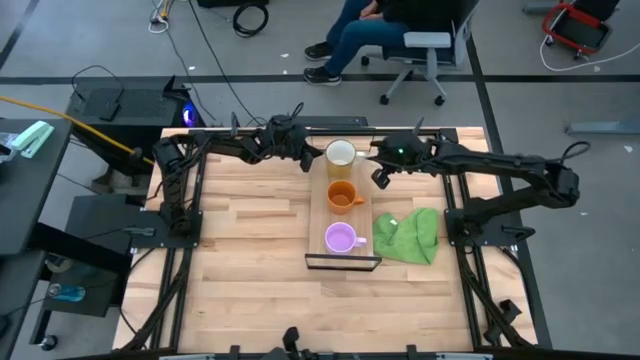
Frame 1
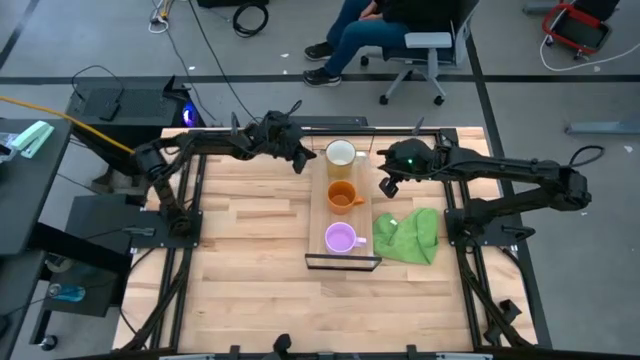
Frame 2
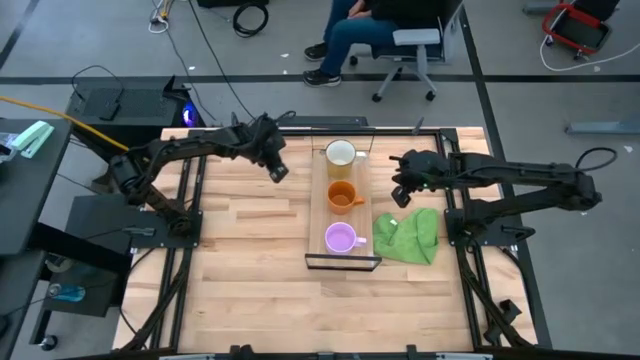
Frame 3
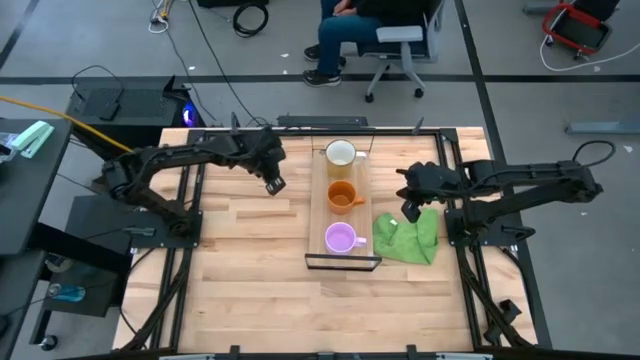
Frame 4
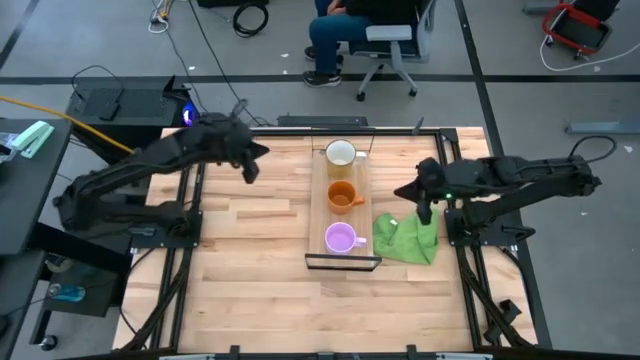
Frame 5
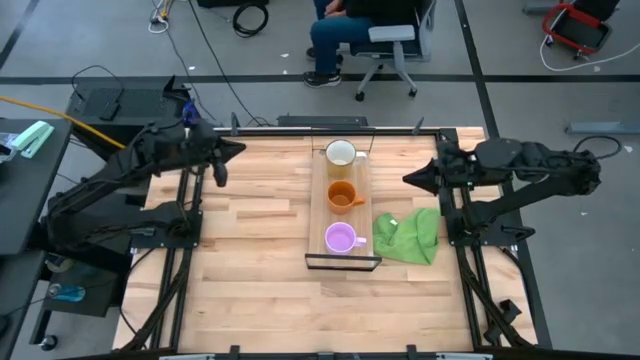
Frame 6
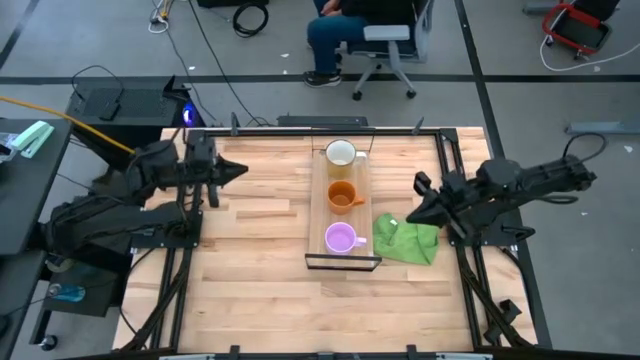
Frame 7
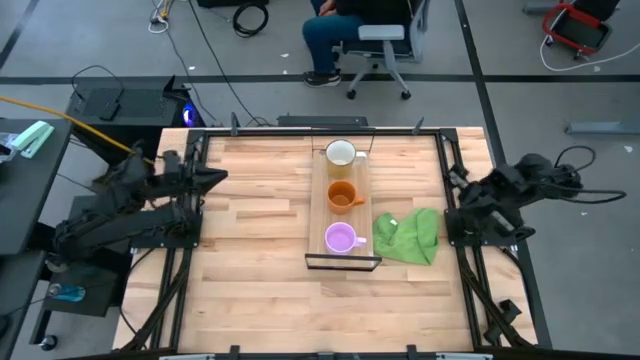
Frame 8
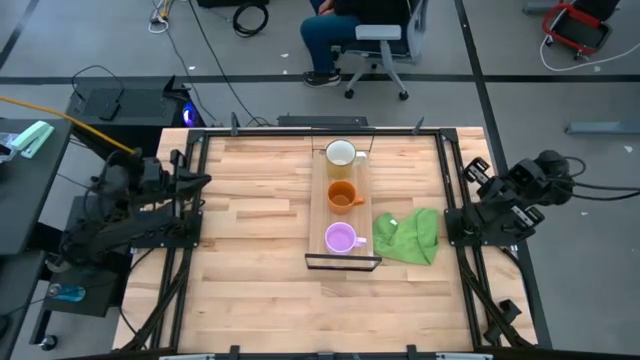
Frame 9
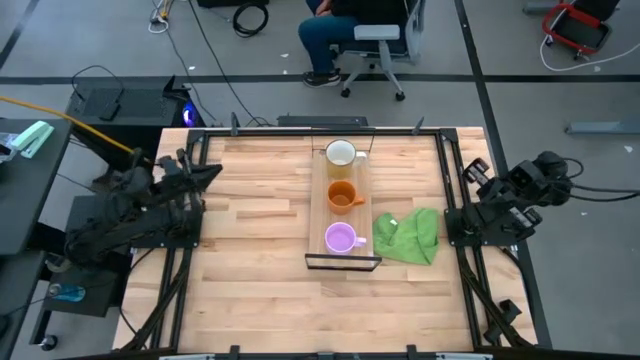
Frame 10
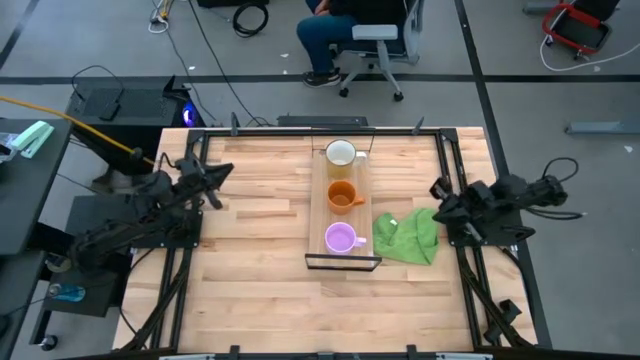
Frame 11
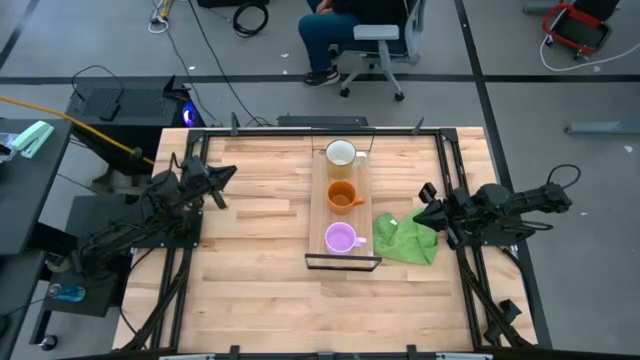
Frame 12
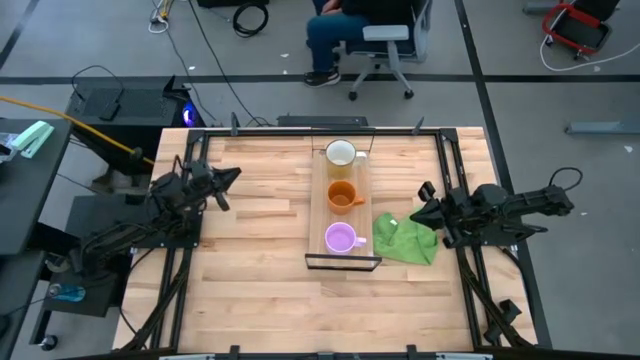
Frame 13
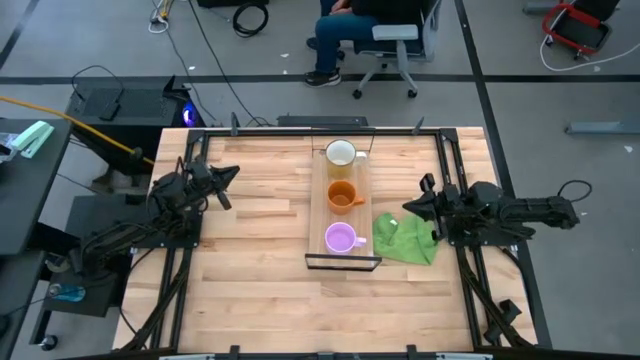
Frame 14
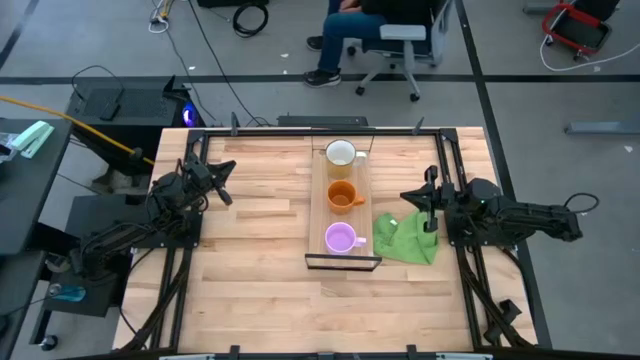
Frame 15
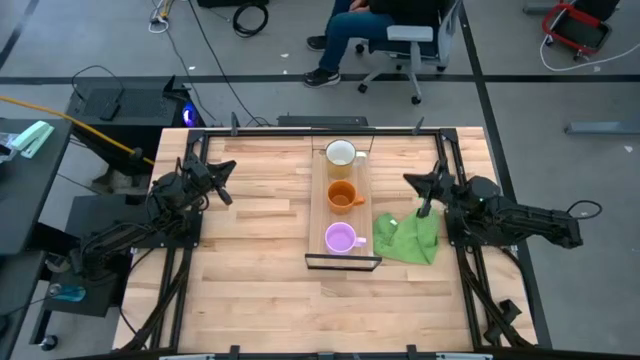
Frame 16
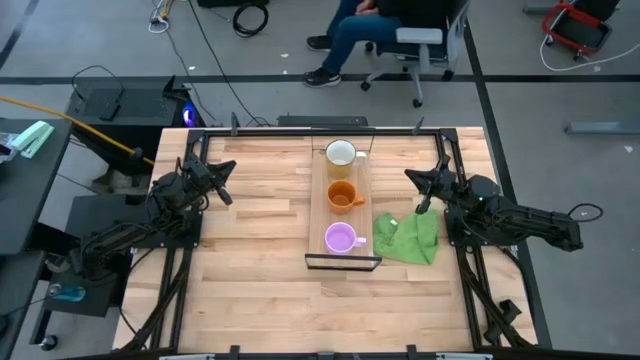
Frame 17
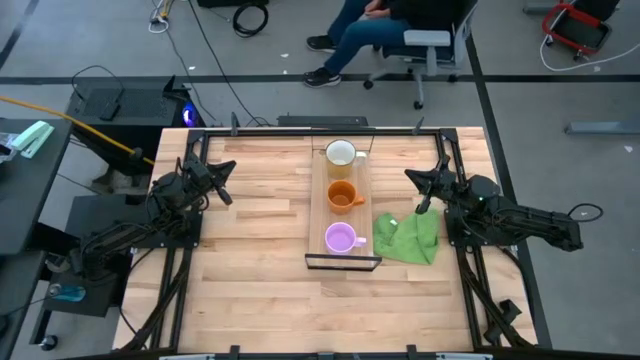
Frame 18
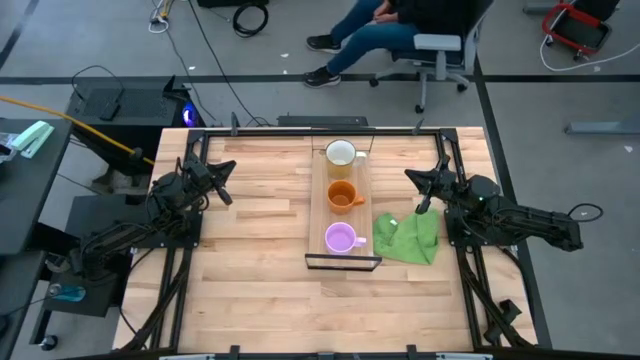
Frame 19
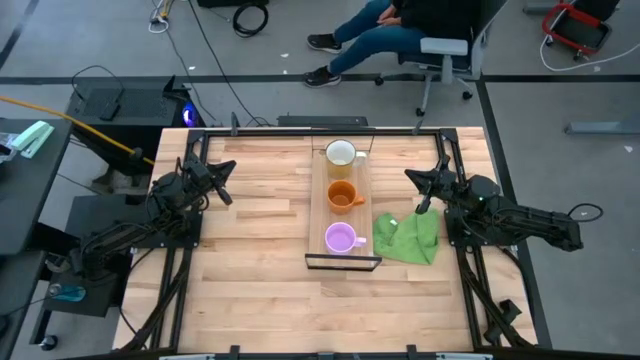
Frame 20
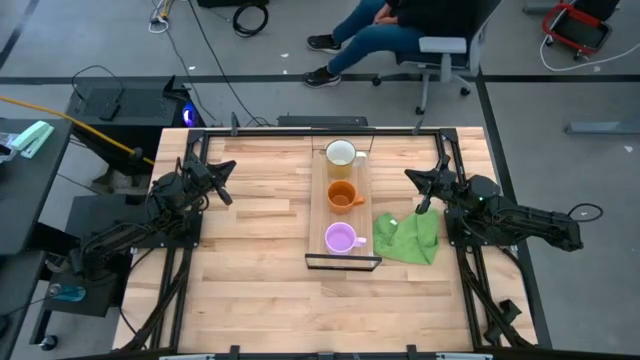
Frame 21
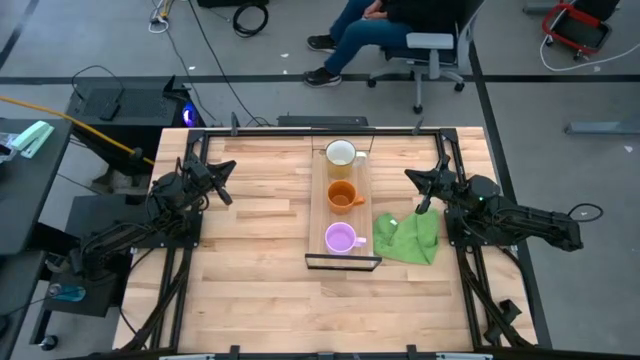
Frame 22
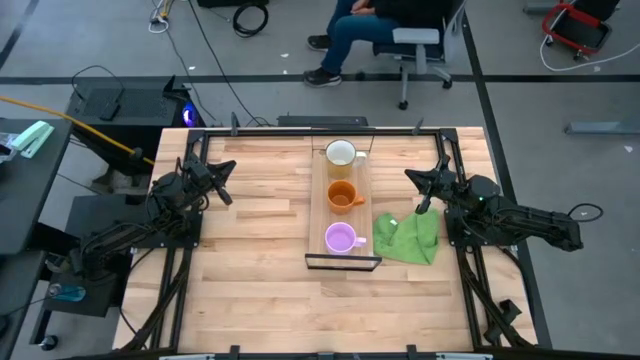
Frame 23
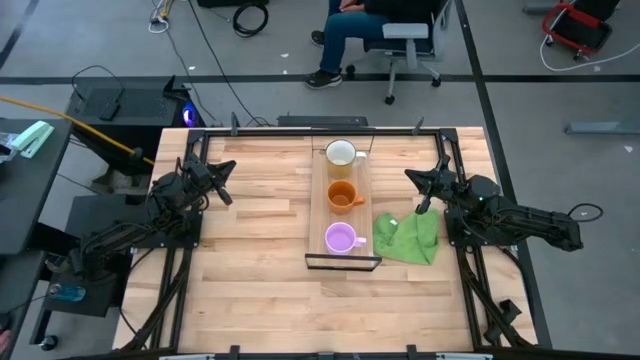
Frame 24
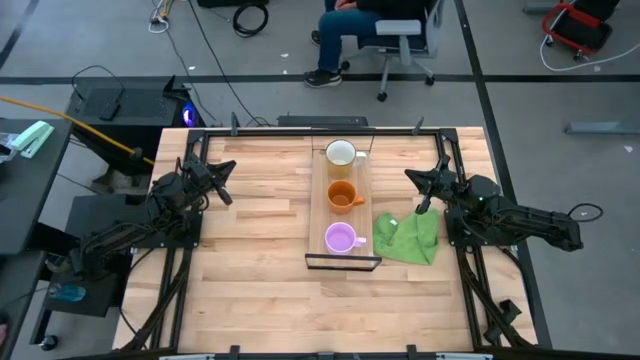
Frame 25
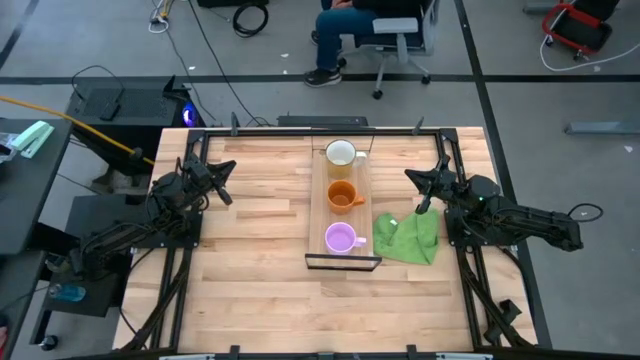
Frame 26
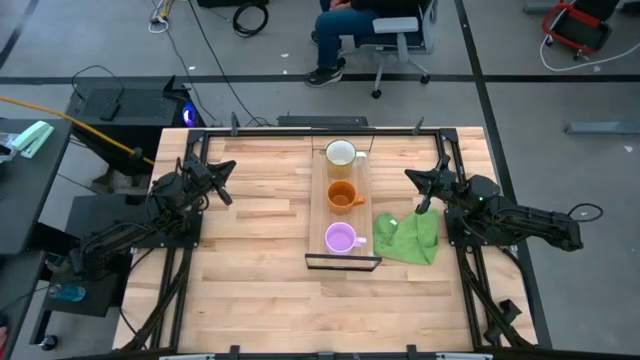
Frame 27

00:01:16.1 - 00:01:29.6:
Task: Stack small to large cups/mugs on shelf
Return to Home Position

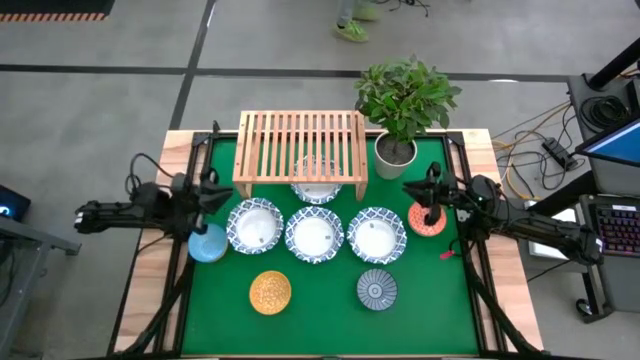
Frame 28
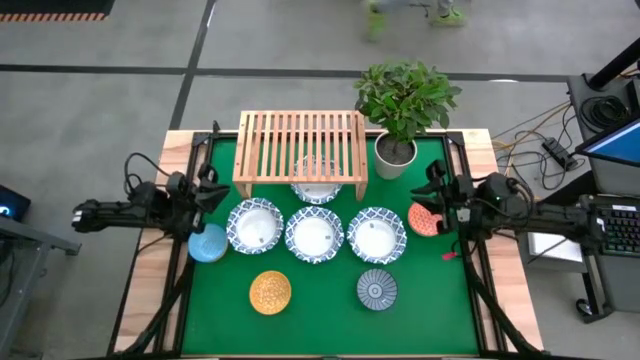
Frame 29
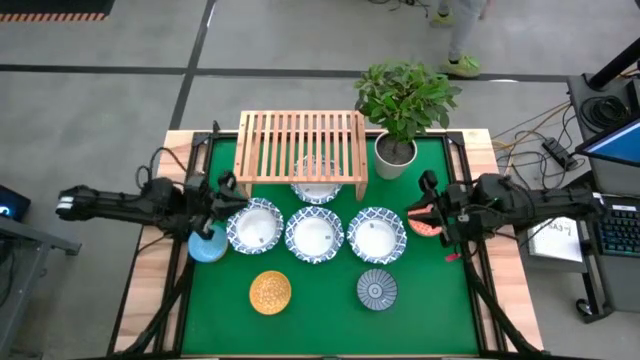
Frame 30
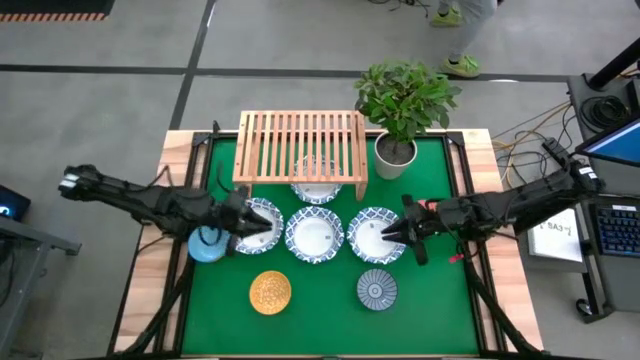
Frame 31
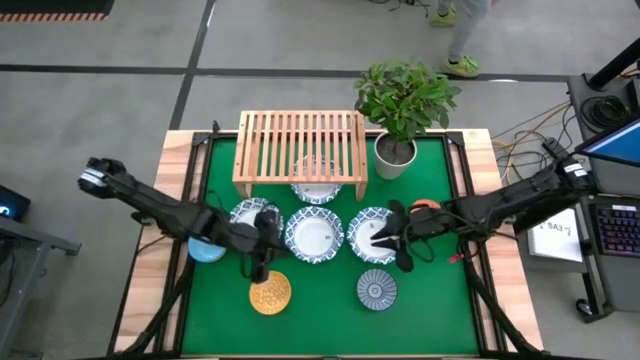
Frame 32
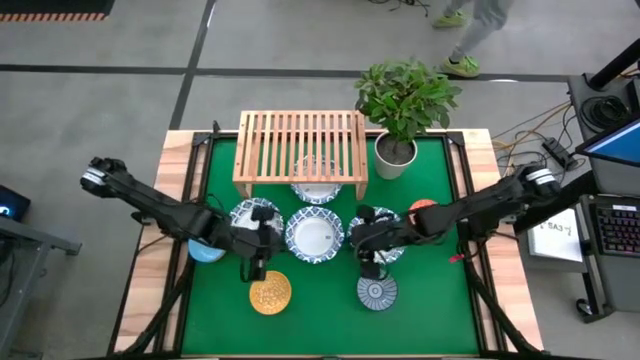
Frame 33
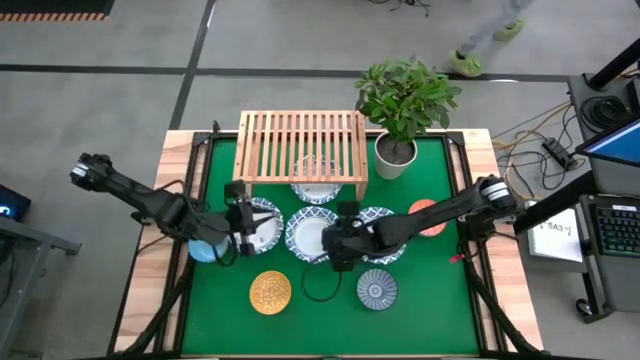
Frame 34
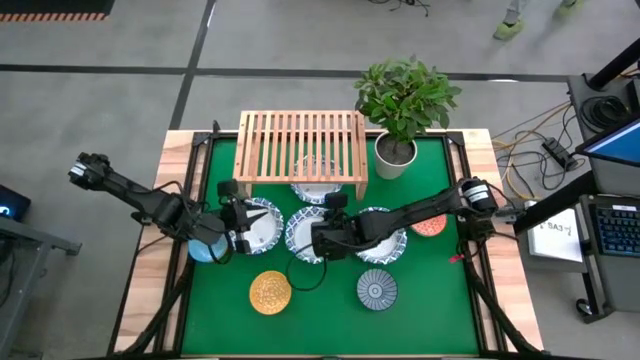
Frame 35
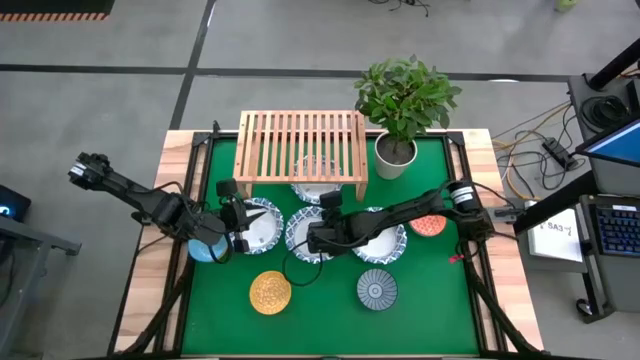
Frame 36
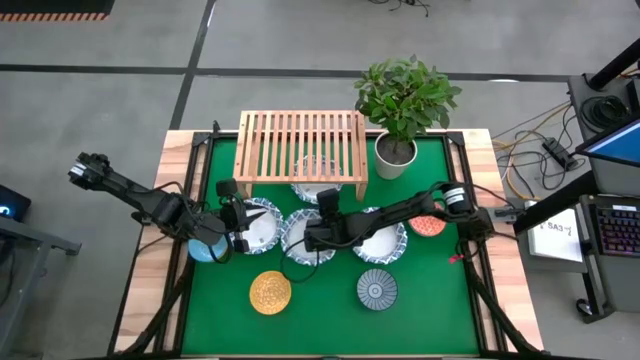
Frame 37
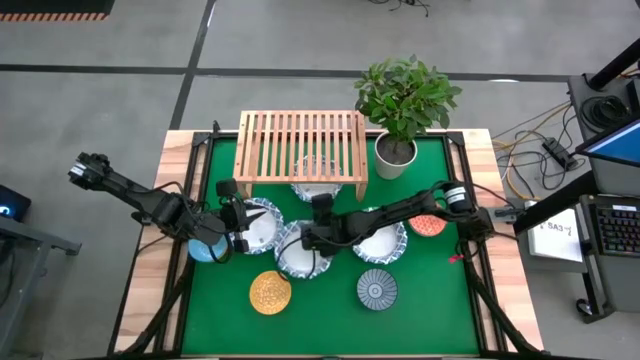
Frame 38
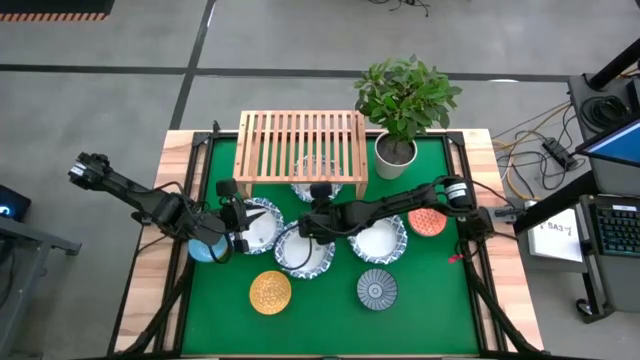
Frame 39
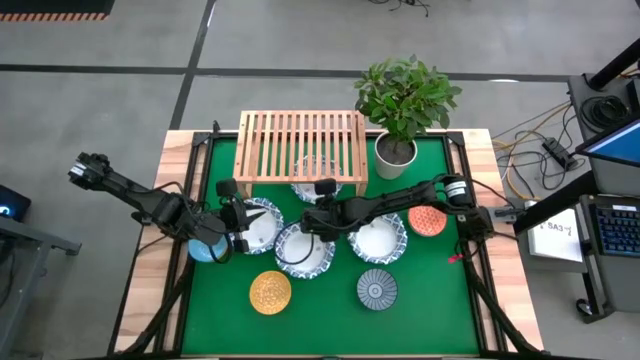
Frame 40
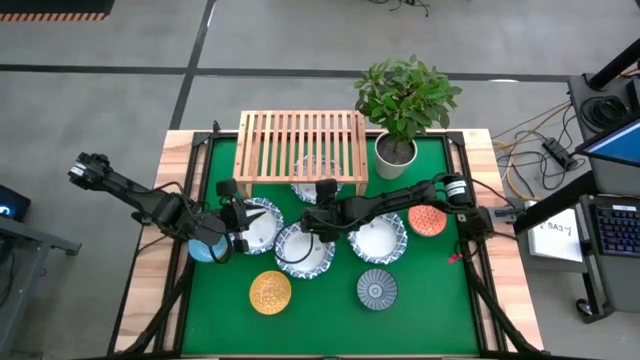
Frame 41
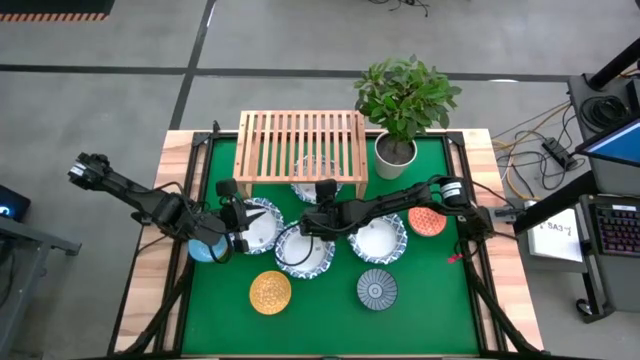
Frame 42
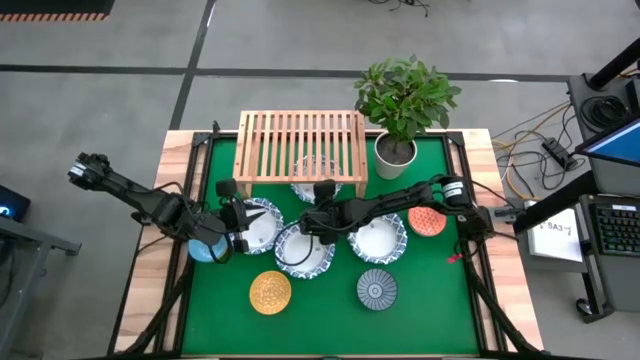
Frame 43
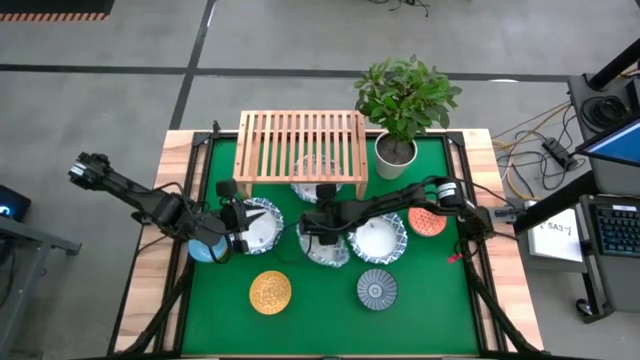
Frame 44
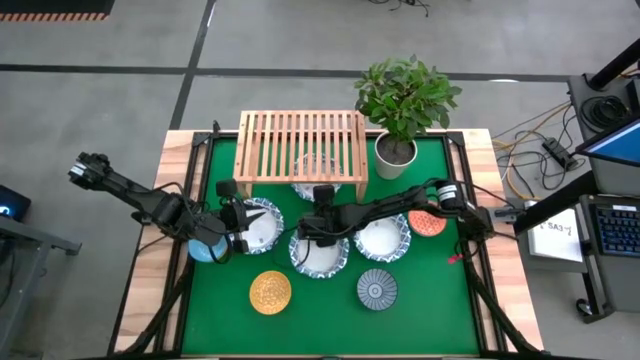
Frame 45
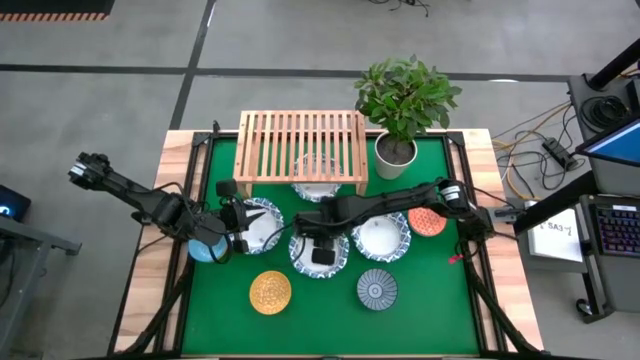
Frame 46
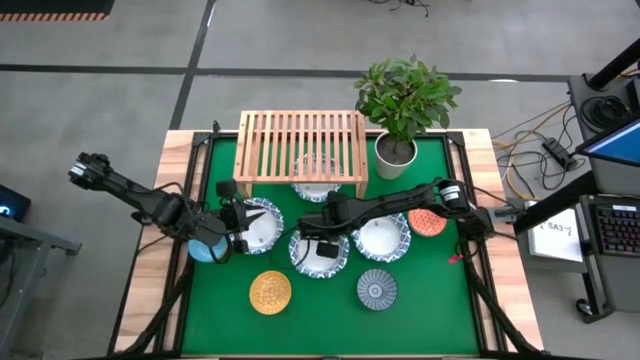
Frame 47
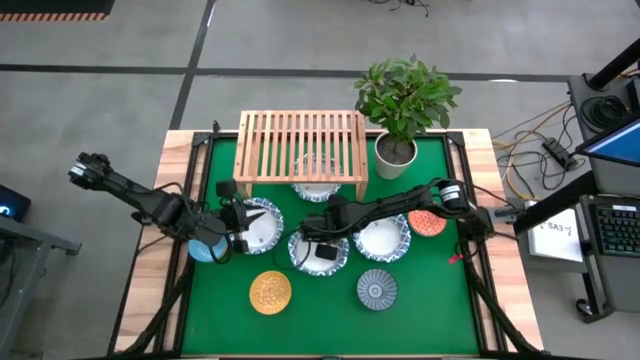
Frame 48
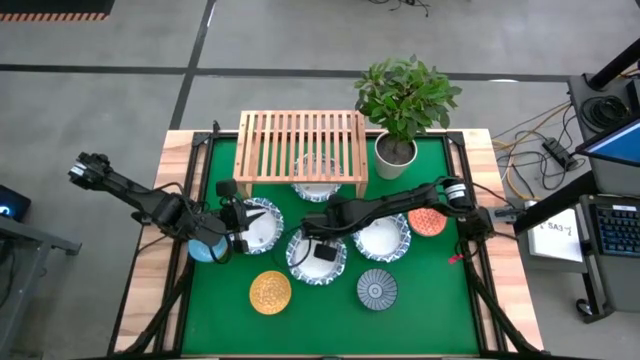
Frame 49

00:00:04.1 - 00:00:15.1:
Task: Place and stack bowls onto a shelf
Put the white bowl on the shelf
